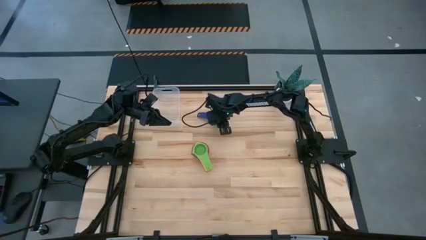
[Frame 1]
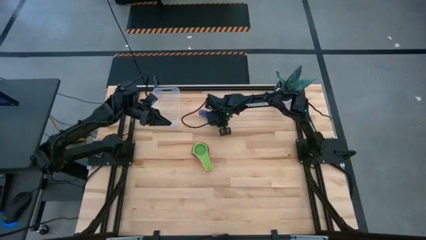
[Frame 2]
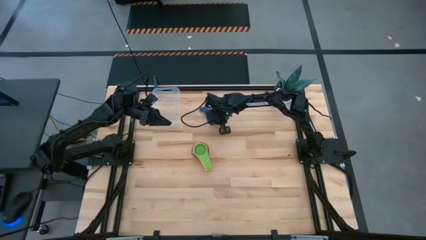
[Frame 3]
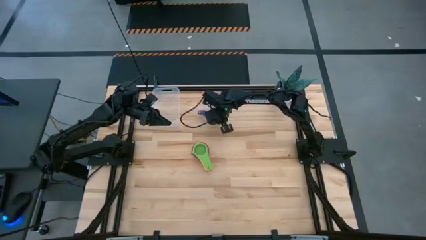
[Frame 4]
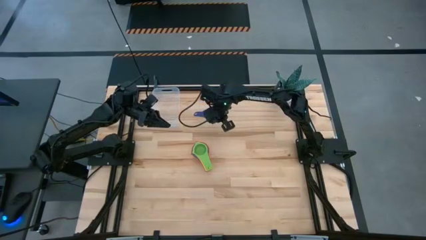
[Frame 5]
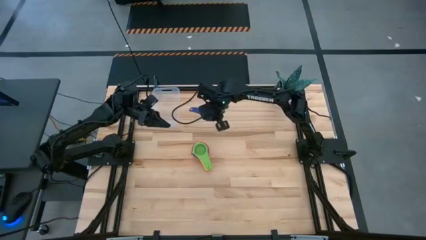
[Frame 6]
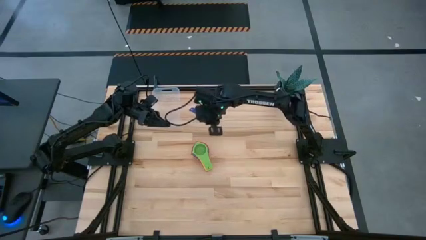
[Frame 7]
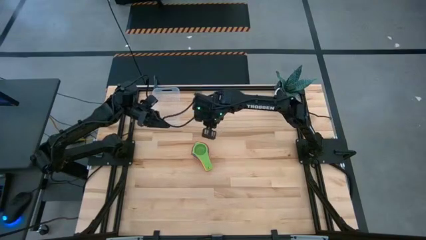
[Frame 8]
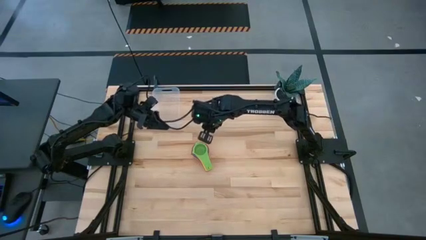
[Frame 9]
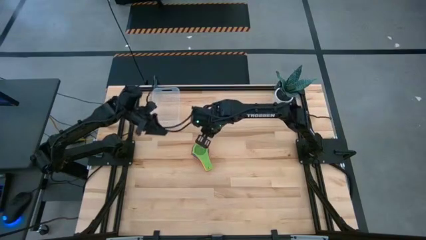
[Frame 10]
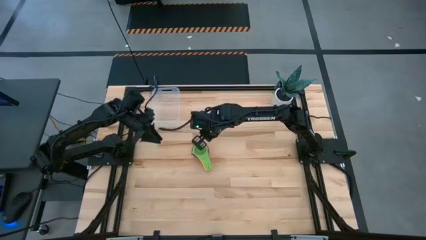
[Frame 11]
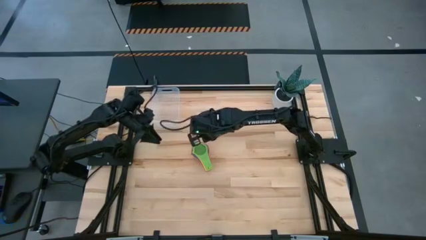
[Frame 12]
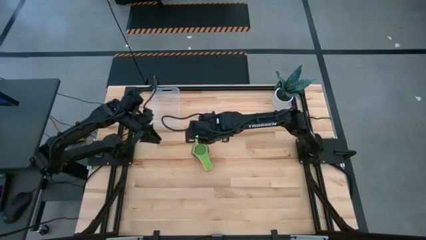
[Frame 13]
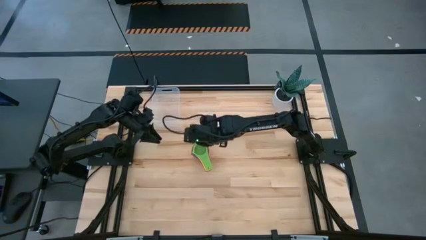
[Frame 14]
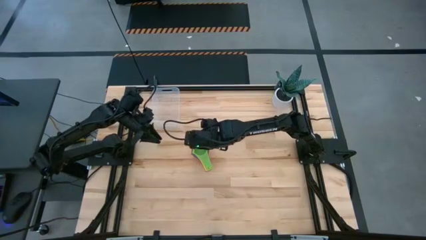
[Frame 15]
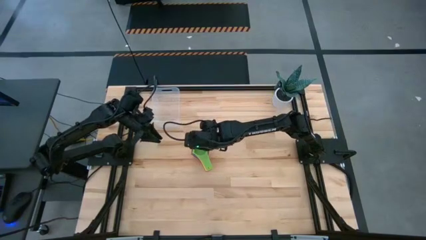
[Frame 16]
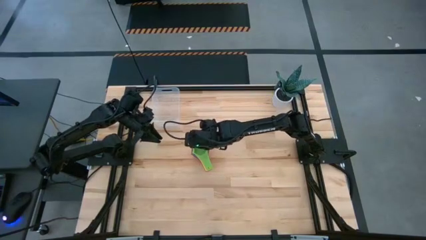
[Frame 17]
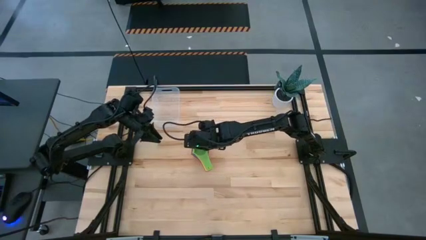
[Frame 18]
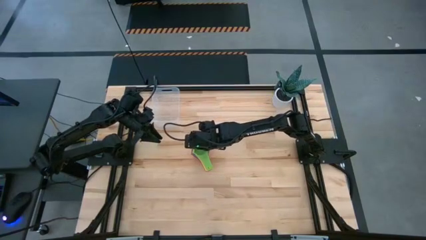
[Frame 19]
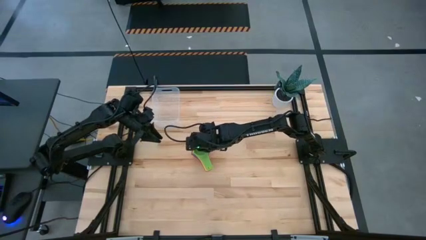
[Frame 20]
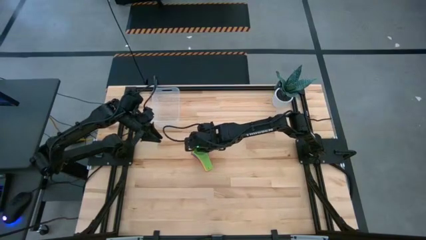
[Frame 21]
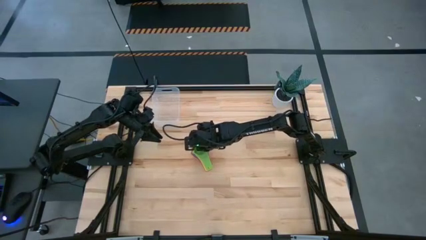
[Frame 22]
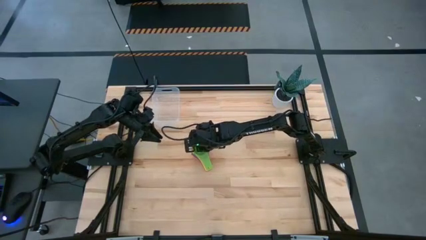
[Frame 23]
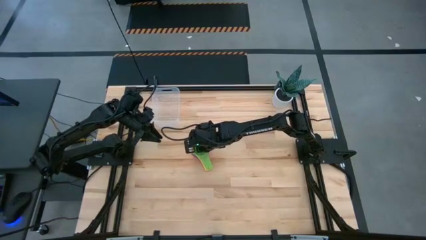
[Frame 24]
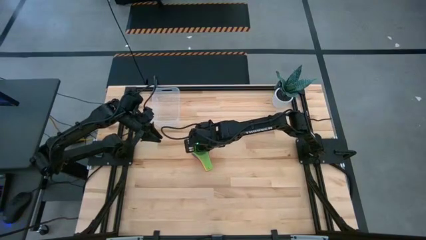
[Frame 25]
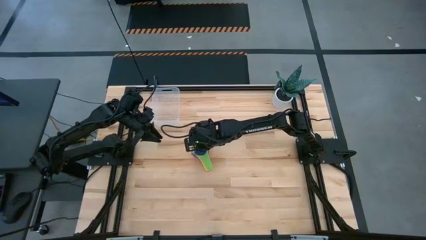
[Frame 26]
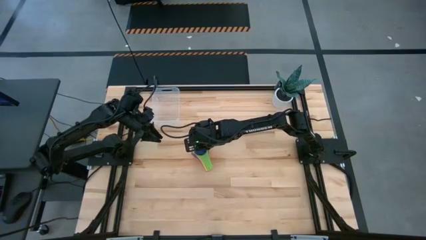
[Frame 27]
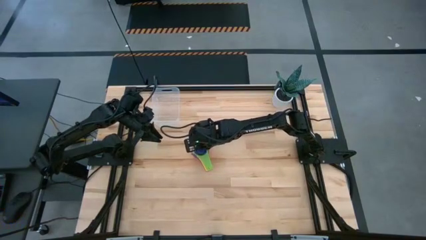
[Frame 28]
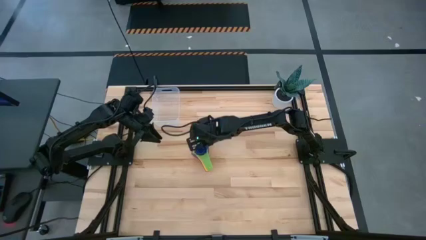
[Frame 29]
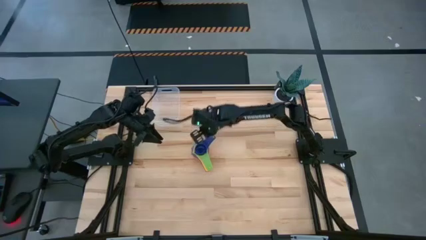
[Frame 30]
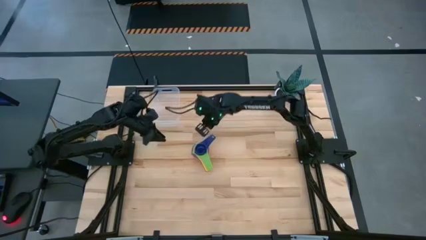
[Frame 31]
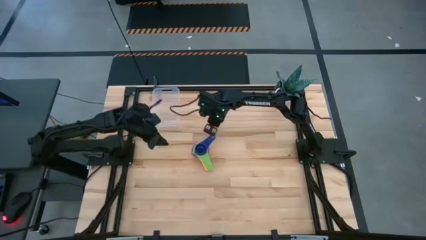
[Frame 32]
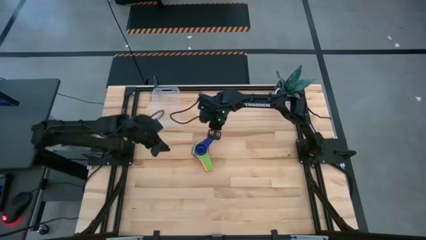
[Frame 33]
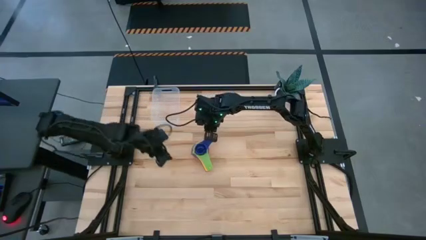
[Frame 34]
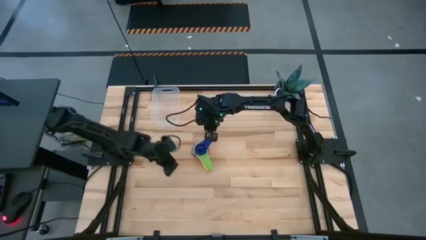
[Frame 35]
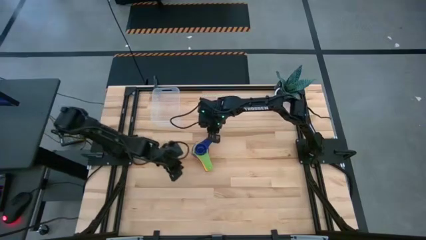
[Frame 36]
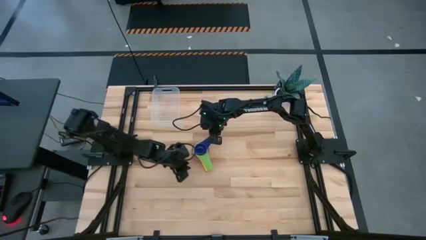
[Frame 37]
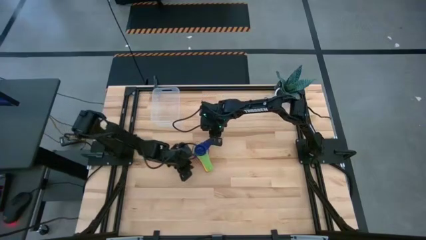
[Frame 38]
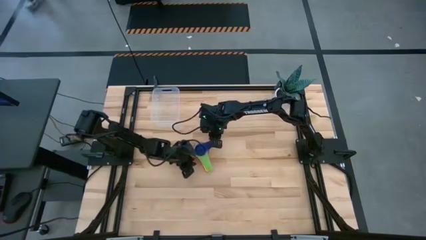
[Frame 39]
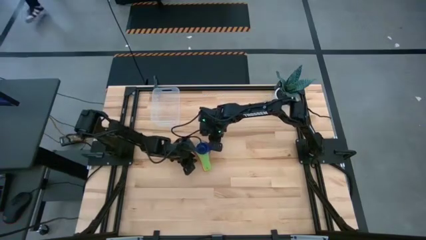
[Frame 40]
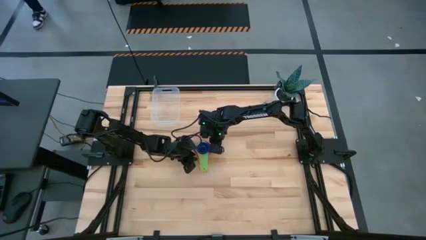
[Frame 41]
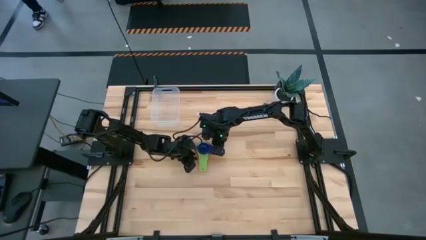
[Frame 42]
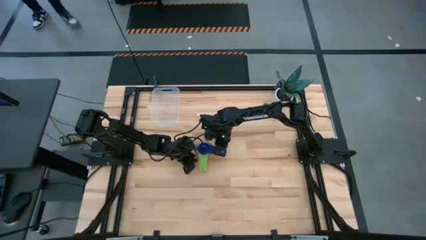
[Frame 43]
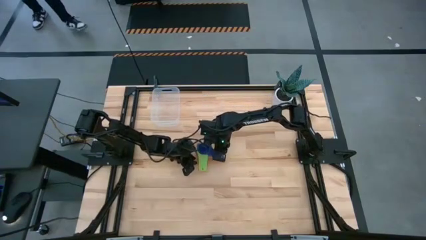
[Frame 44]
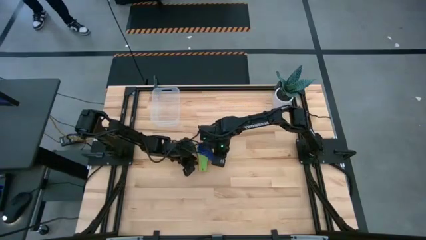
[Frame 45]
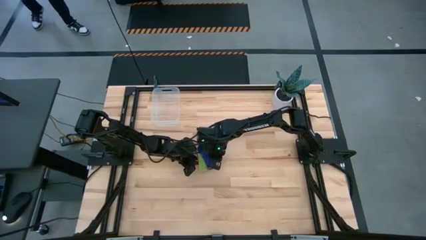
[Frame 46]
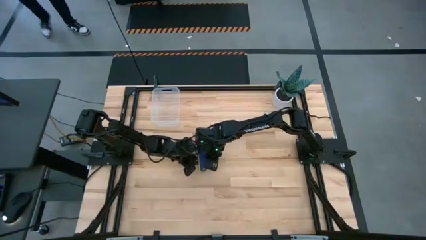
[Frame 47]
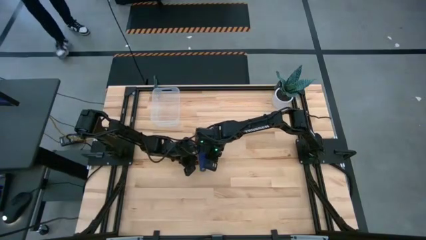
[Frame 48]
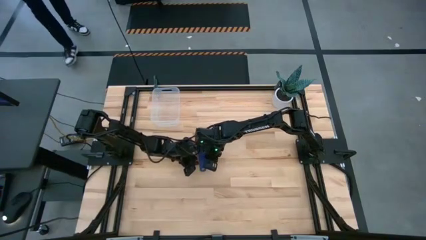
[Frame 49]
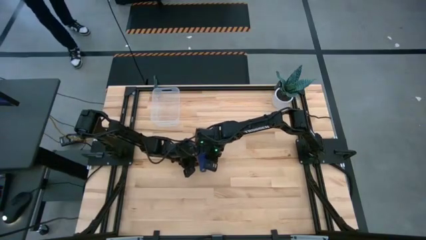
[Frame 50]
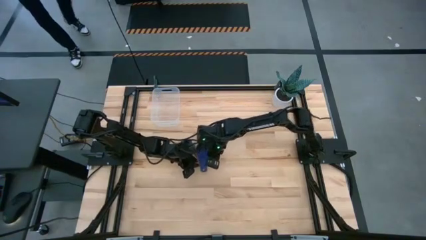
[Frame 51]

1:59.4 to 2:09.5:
Task: Nest measuring cups in basket
Stack the blue measuring cup on top of the green measuring cup

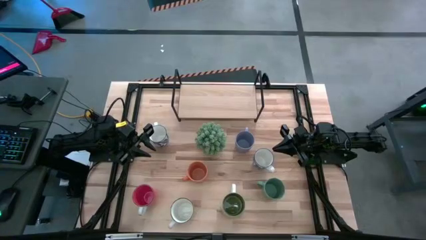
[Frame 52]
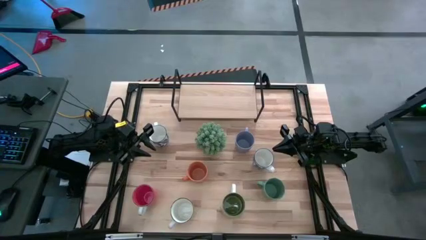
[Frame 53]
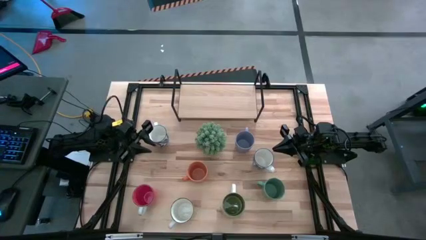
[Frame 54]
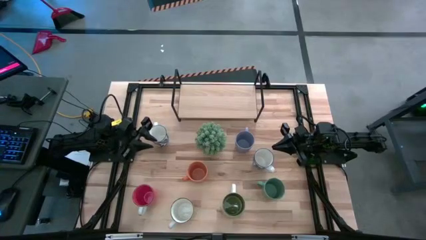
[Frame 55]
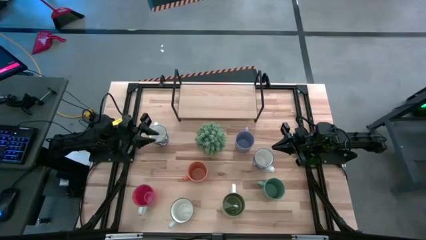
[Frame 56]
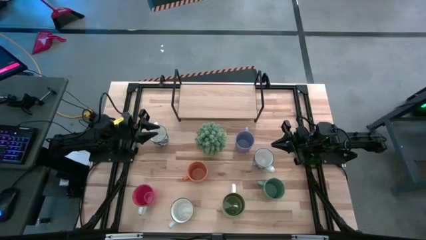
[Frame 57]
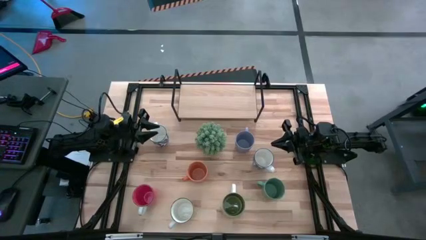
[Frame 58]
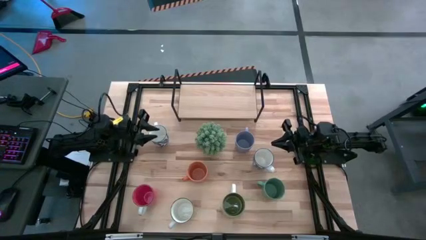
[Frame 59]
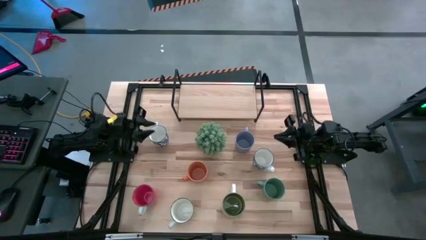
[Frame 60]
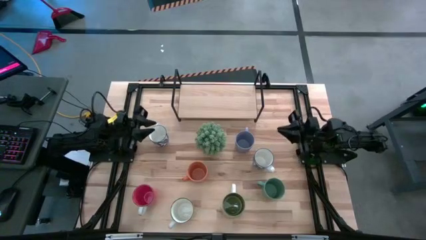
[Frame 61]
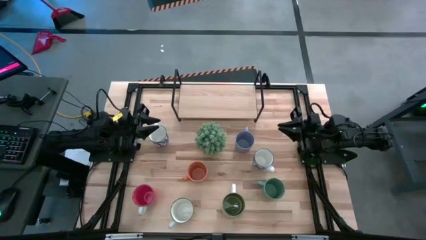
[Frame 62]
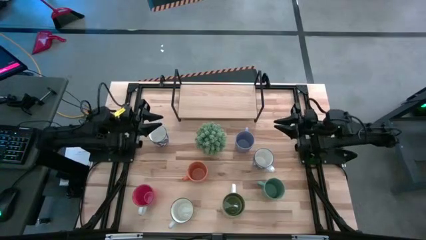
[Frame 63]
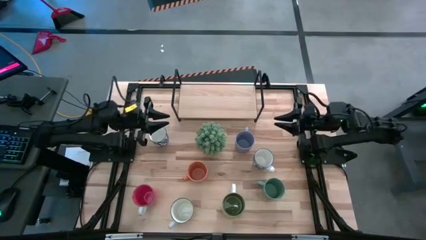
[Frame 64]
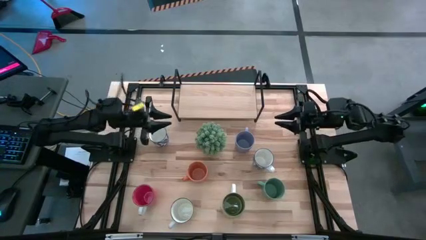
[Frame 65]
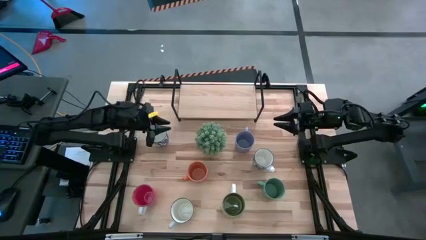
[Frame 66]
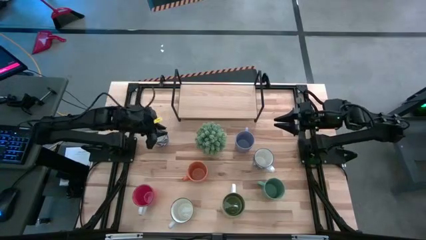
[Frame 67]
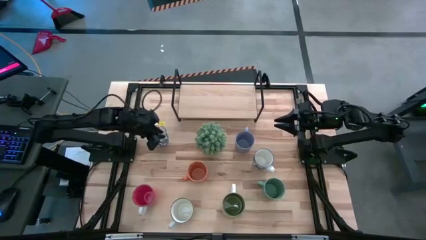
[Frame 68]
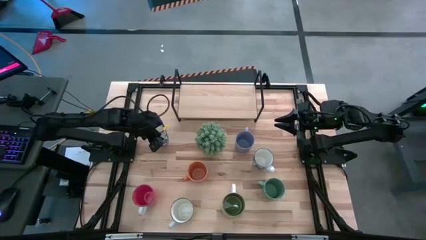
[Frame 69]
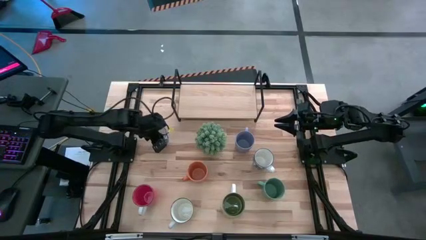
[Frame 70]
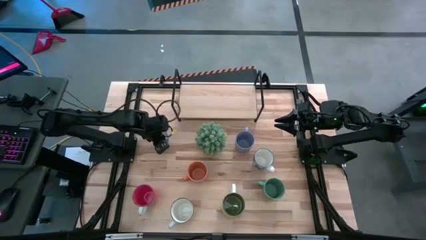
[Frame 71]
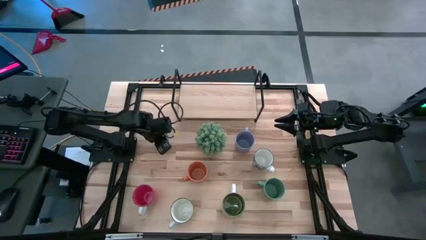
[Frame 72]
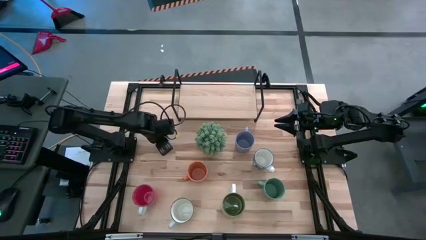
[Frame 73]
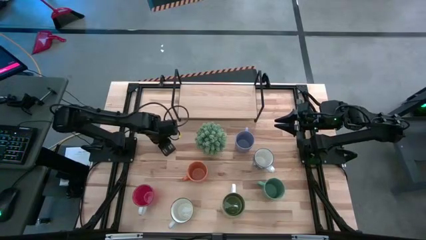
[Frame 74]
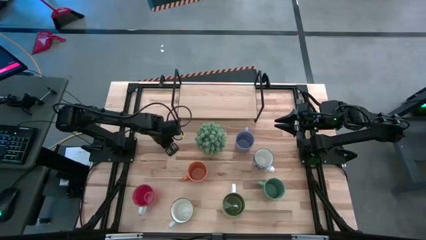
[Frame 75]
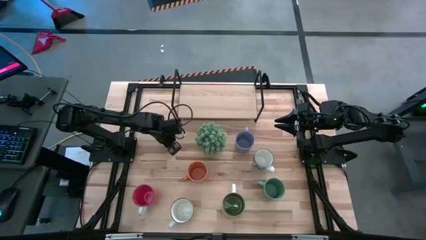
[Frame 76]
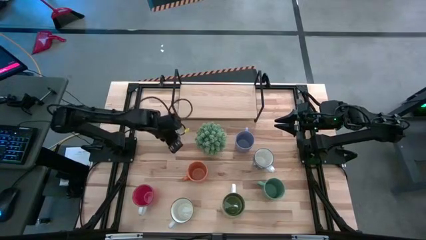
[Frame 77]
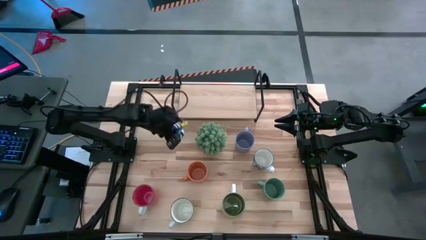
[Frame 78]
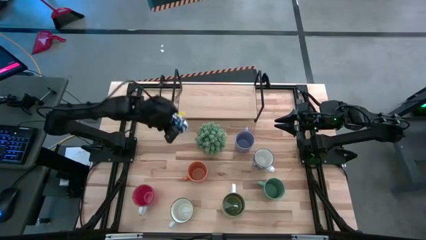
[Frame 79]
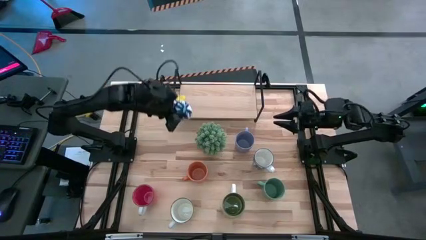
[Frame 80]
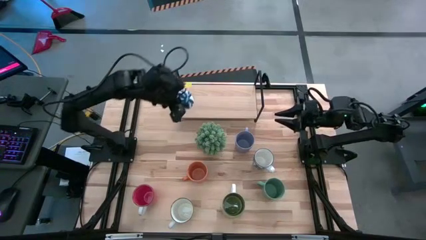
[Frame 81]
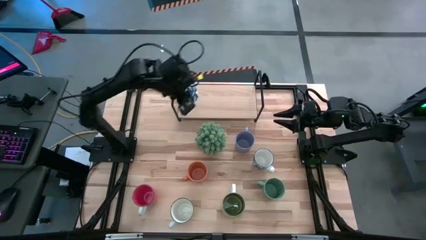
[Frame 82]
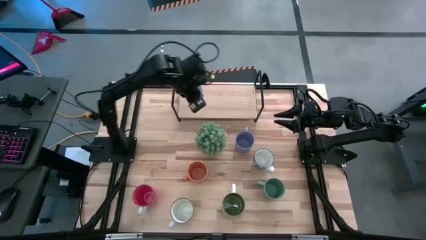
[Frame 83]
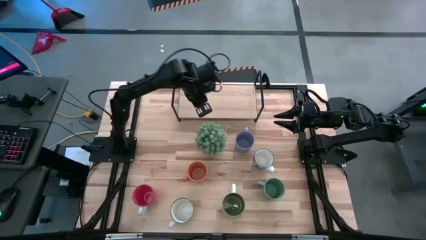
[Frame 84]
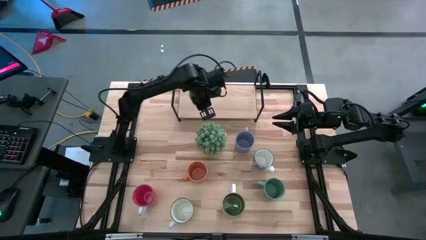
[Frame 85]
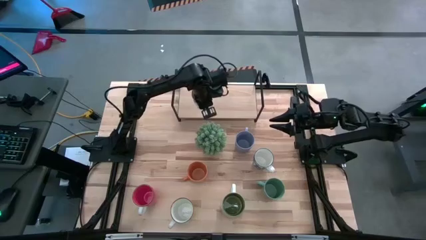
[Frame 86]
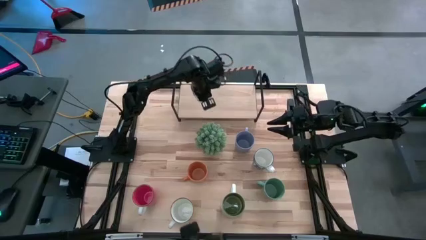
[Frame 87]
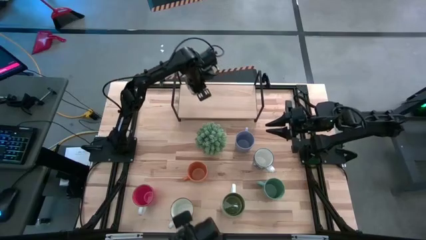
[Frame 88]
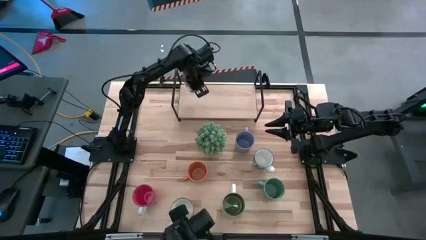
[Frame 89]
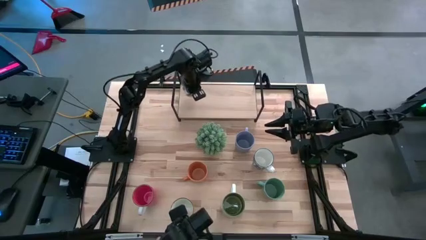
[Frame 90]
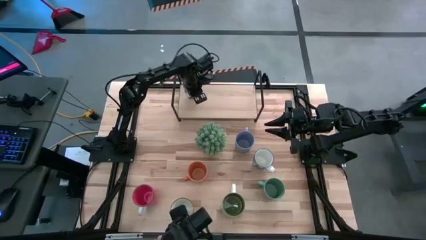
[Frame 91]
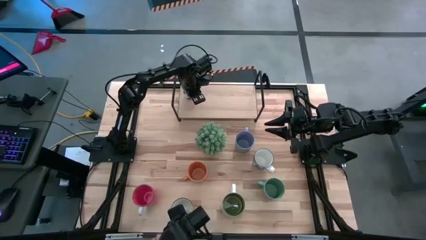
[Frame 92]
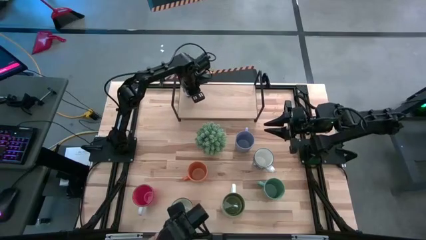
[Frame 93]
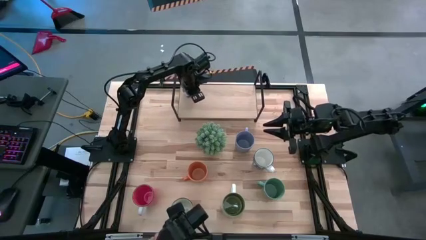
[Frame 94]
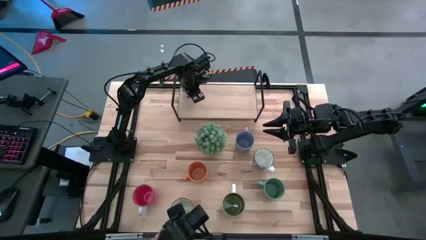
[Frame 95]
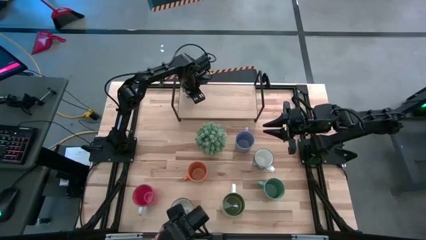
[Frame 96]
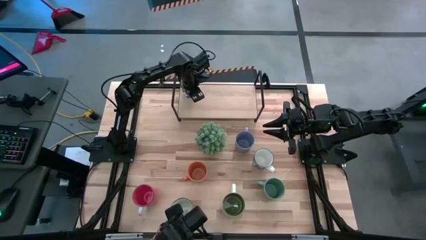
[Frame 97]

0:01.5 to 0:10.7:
Task: Place coffee mugs
Put the left blue patterned mug on the shelf
